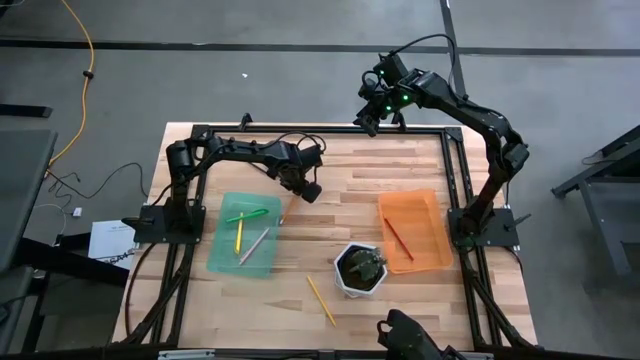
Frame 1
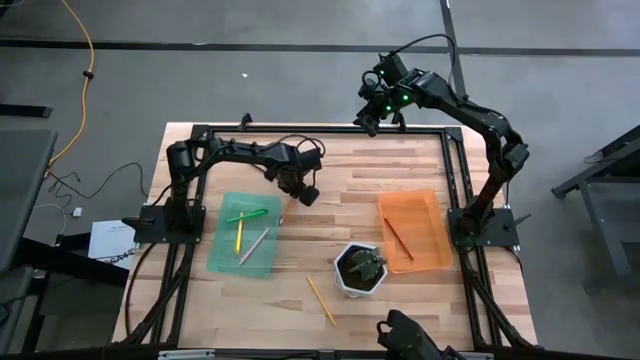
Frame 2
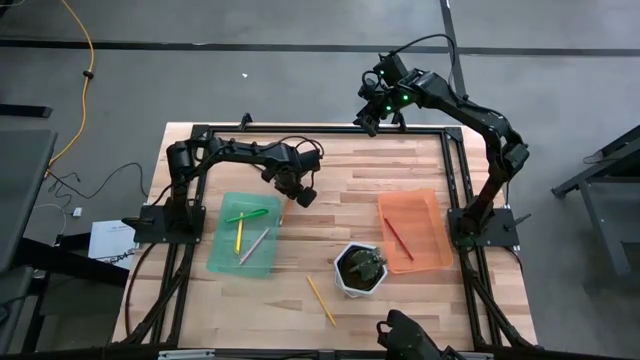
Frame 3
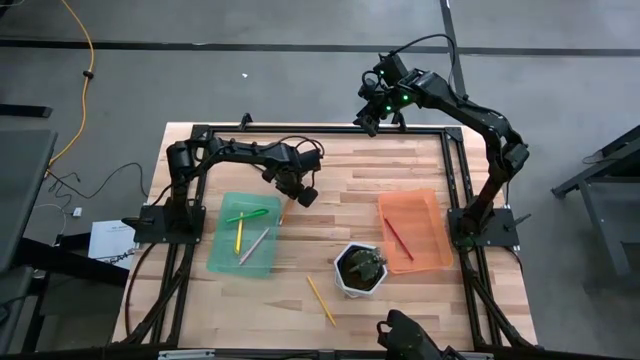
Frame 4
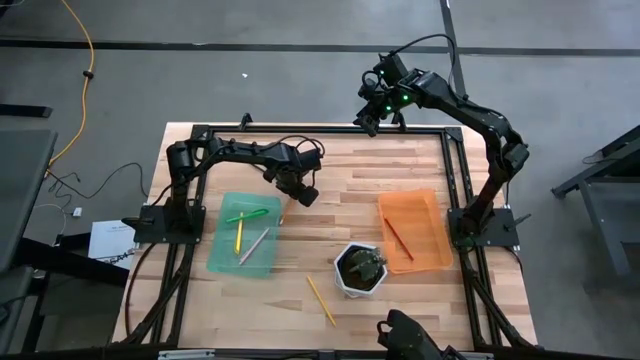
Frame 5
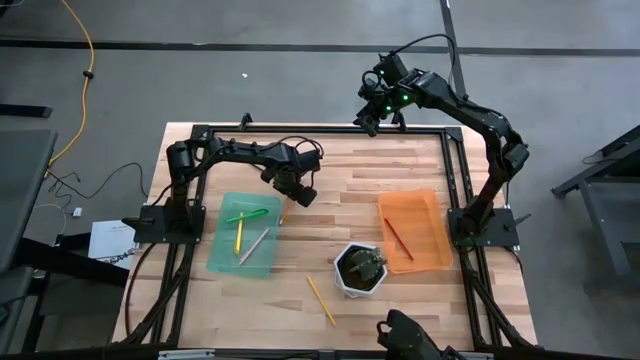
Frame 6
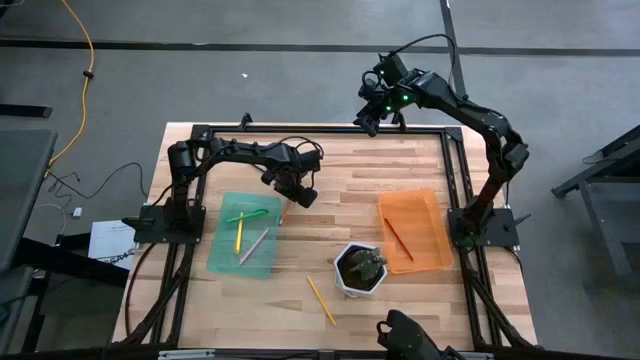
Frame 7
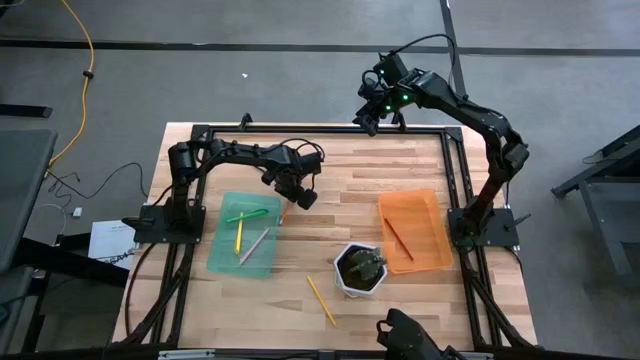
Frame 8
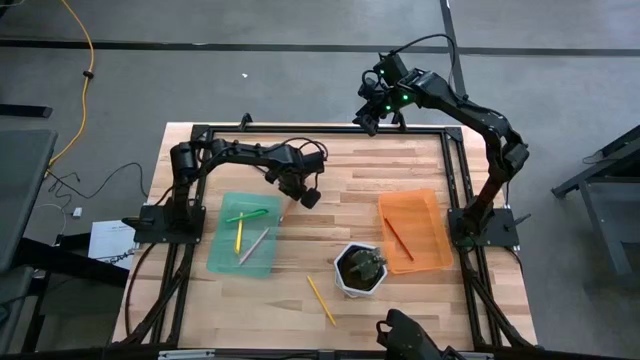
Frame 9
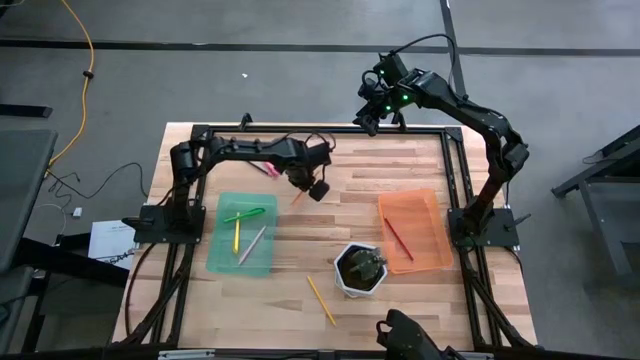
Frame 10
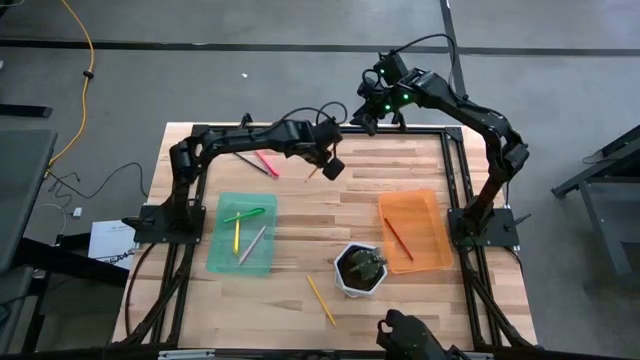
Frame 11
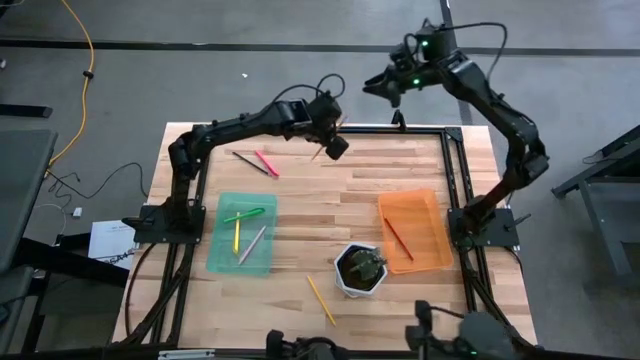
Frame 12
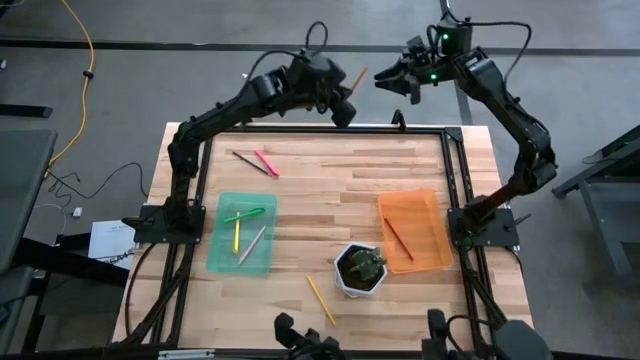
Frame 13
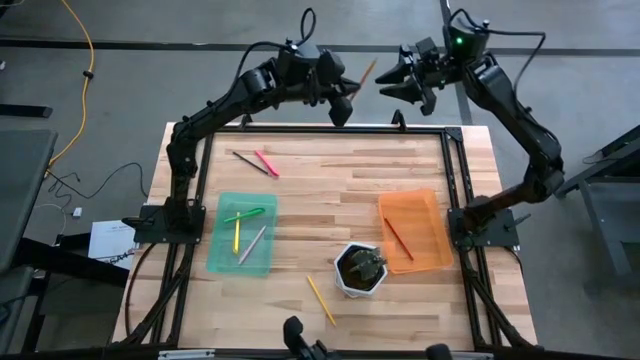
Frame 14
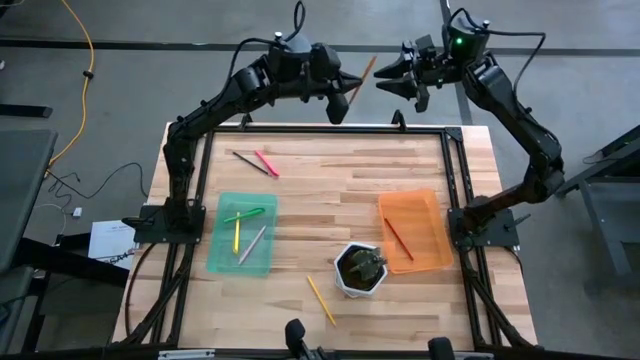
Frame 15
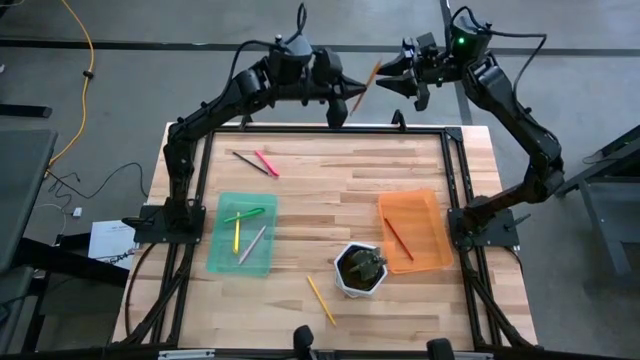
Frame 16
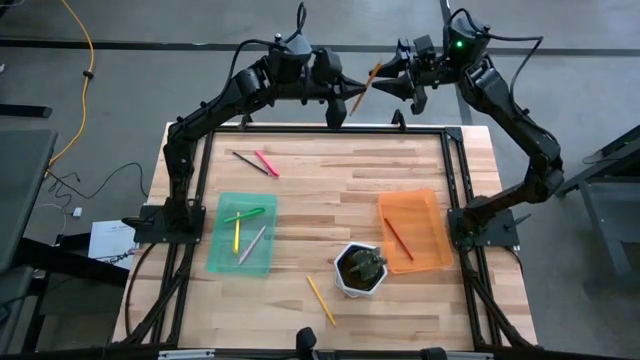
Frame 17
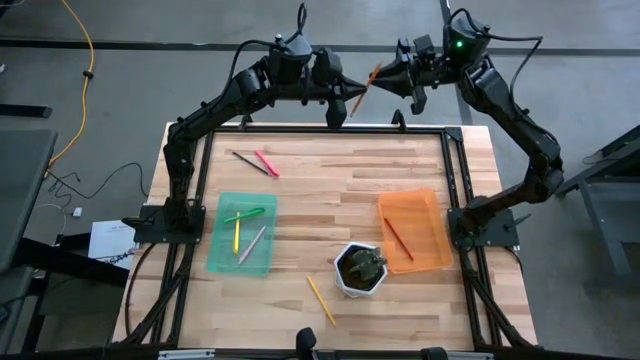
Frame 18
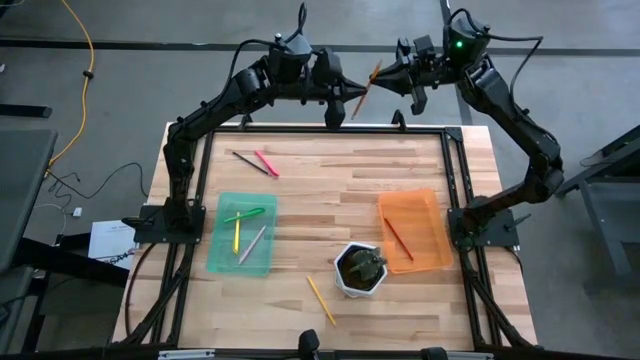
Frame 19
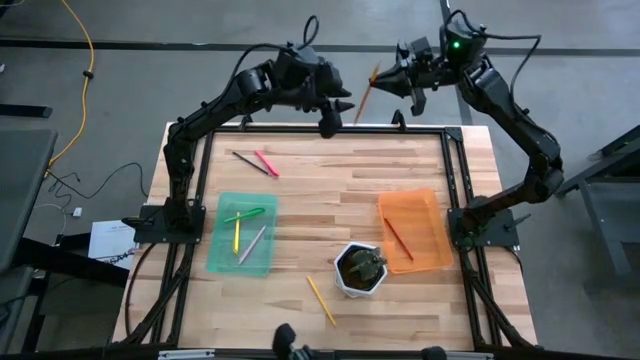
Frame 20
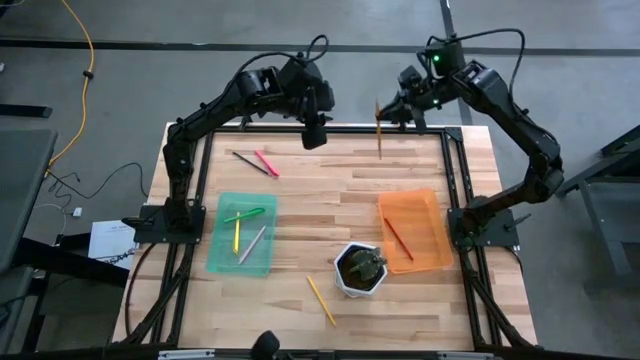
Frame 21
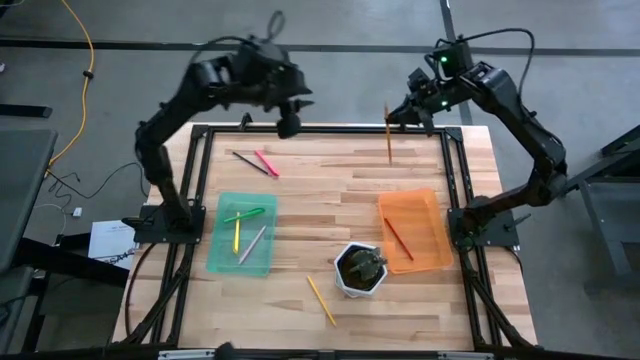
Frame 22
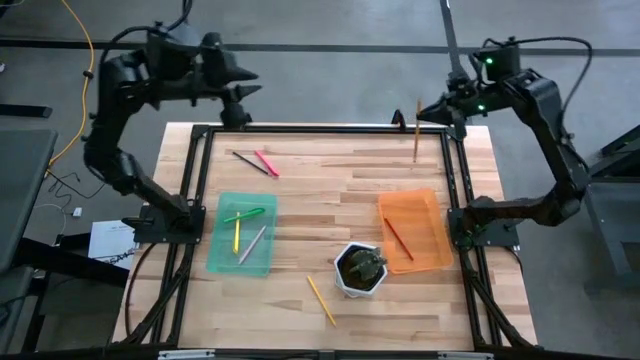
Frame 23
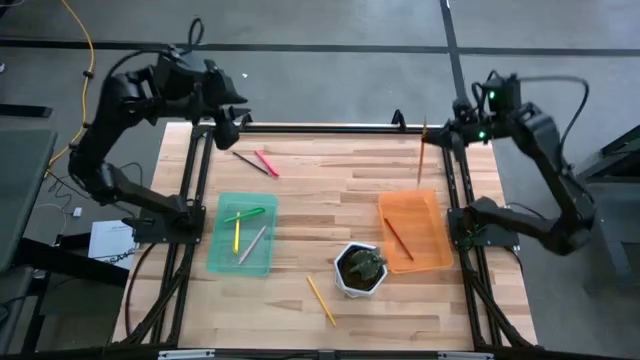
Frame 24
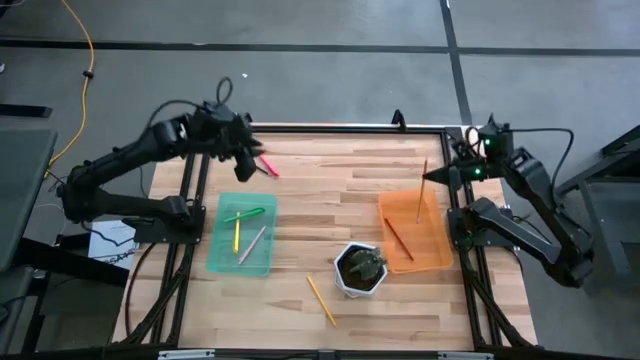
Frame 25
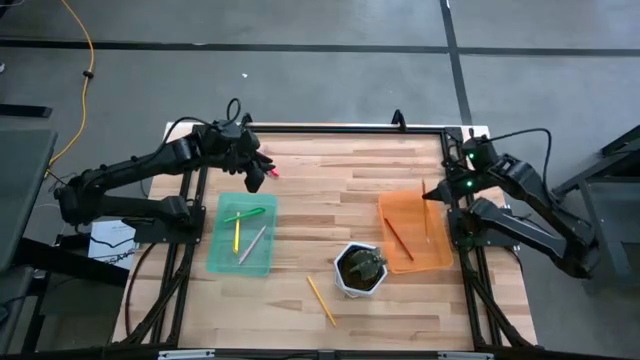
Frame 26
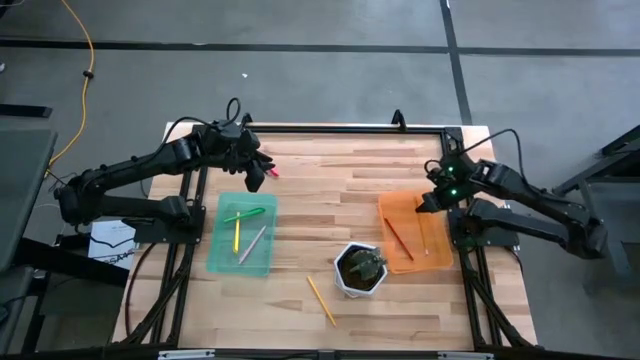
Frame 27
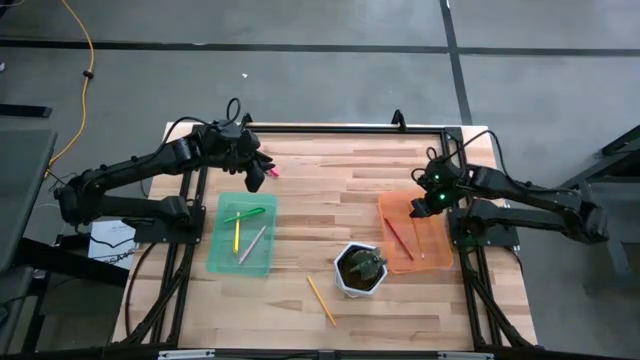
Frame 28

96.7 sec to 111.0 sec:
Task: Sort pens & pencils
Put the orange pencil into the orange bin

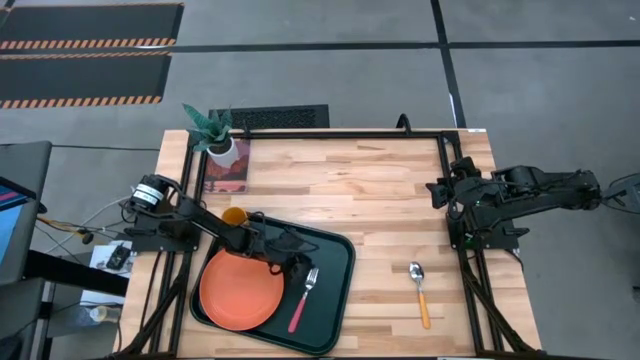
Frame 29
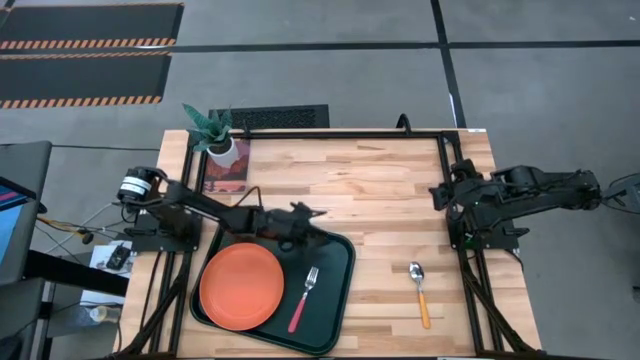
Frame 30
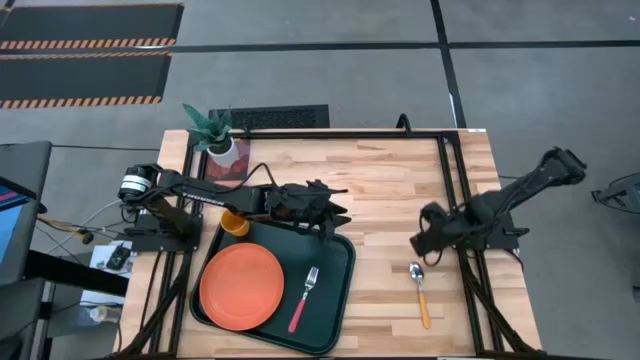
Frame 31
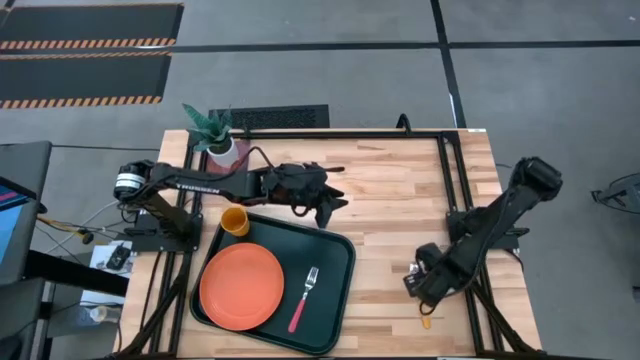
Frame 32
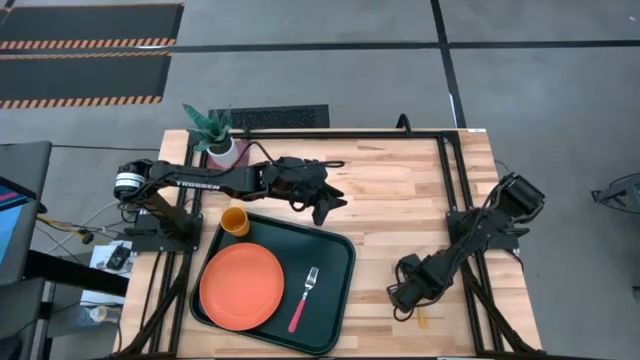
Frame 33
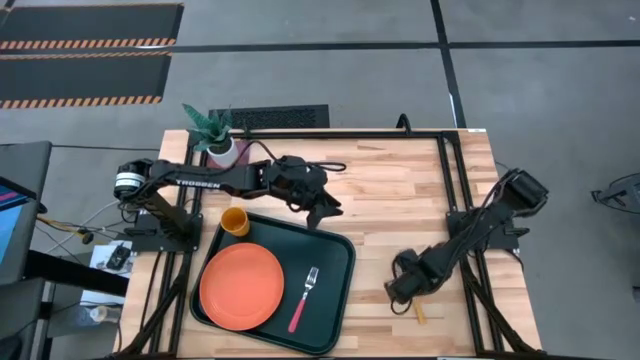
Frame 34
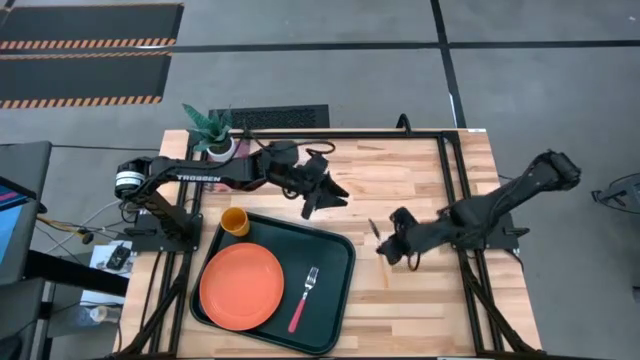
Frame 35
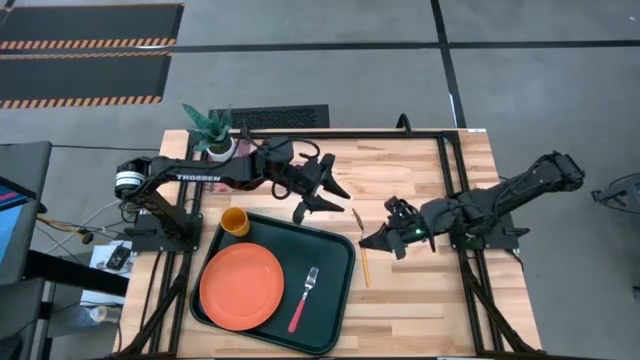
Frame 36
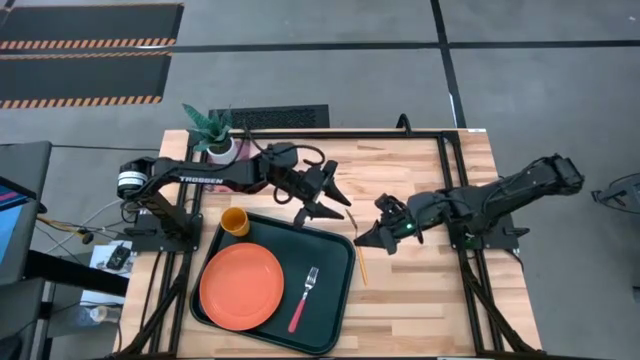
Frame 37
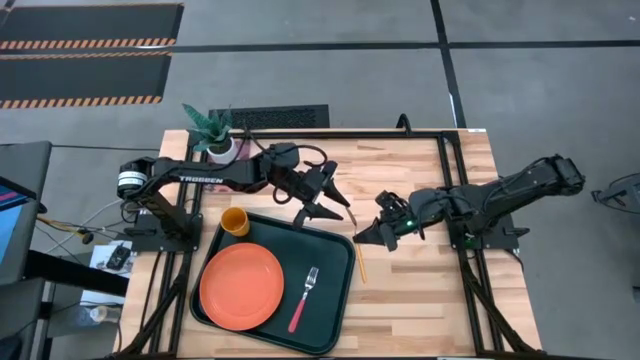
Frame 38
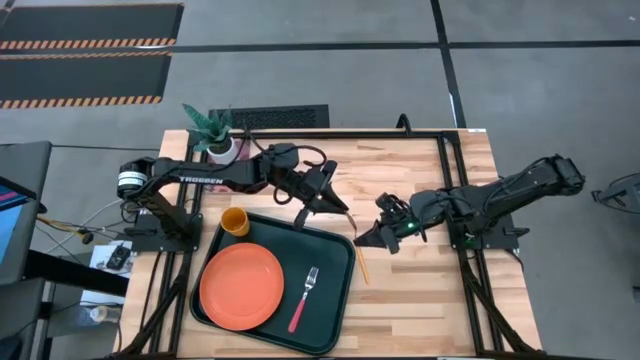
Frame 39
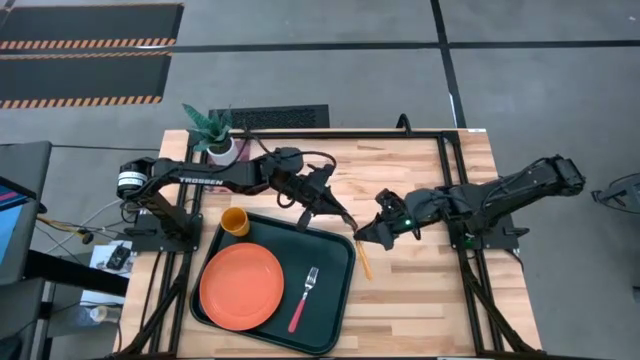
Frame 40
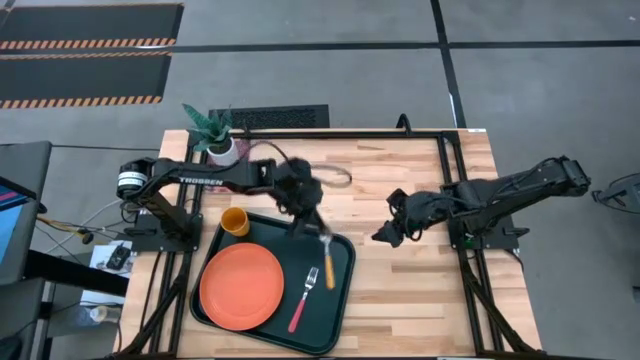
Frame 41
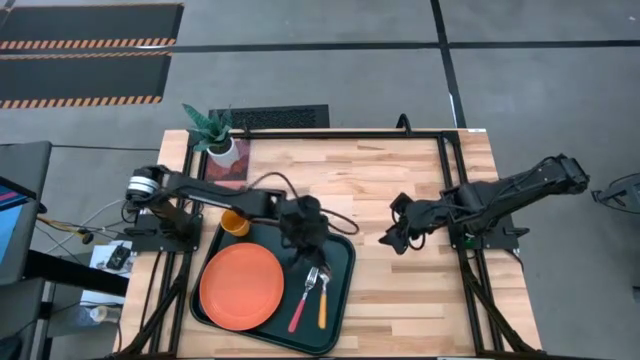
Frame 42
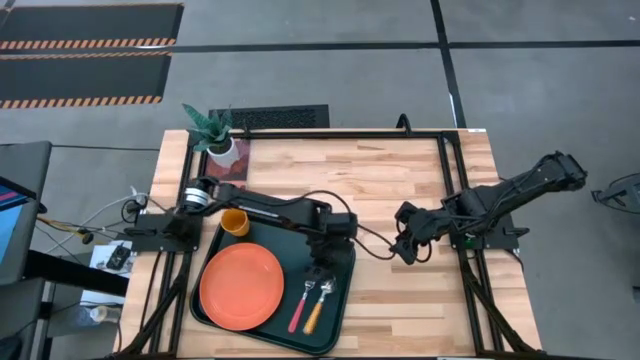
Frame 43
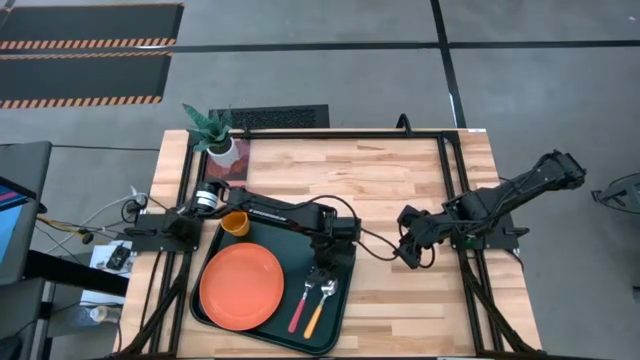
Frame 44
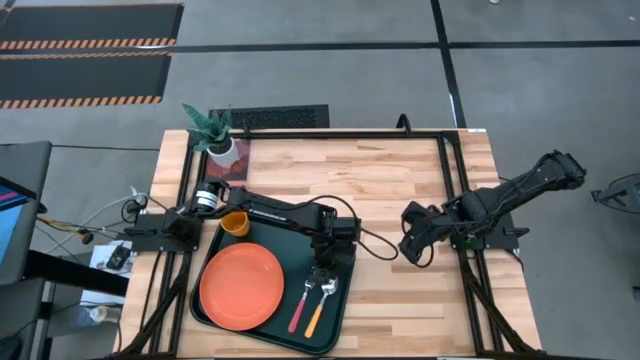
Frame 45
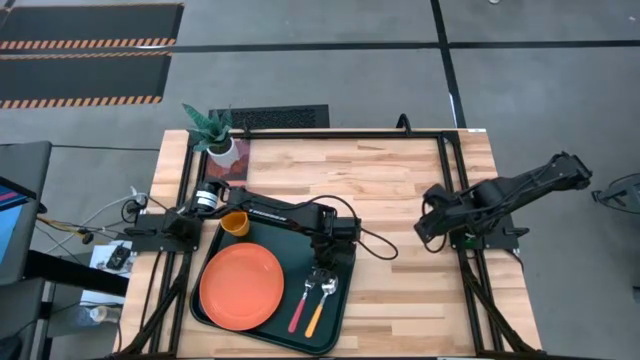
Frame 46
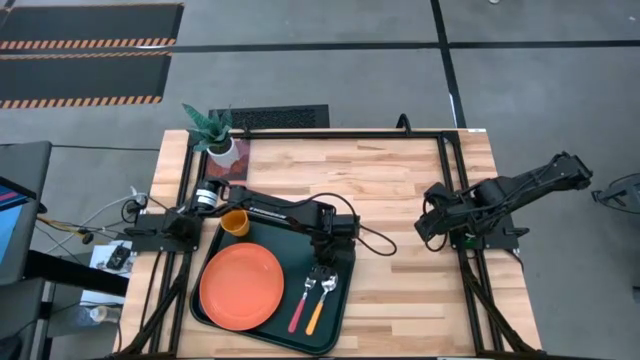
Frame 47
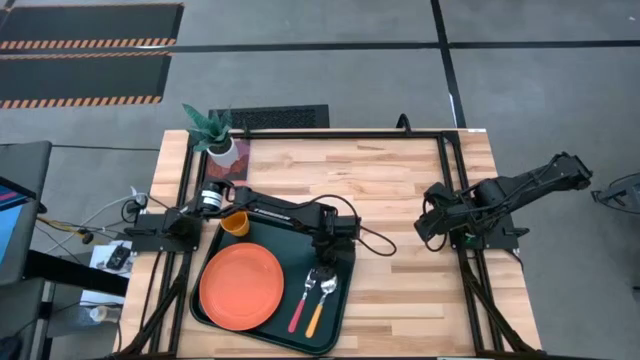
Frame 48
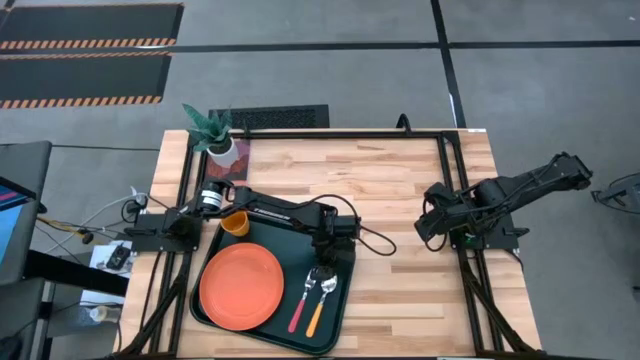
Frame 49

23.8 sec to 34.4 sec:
Task: Pick and place plate/cup/fork/spoon on tray
Put the yellow spoon to the right of the pink fork on the black tray
